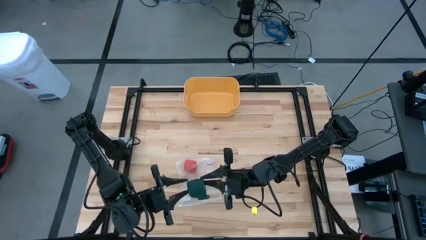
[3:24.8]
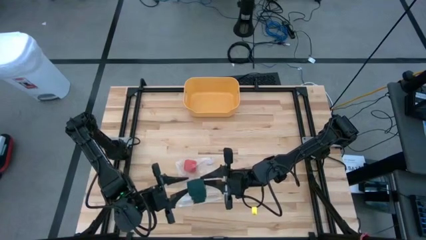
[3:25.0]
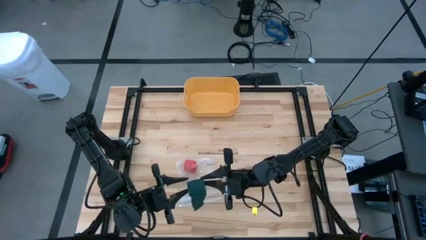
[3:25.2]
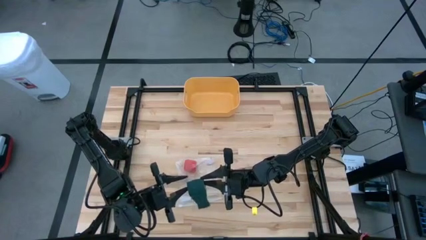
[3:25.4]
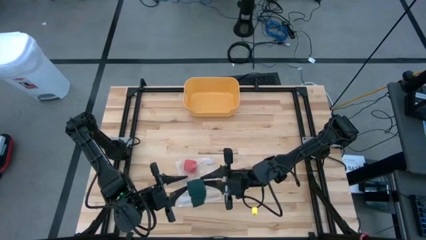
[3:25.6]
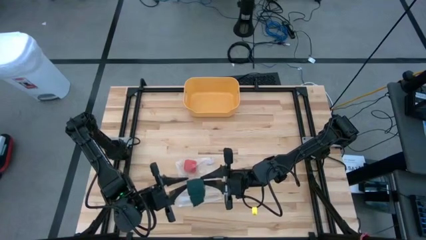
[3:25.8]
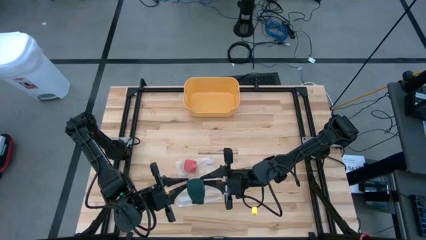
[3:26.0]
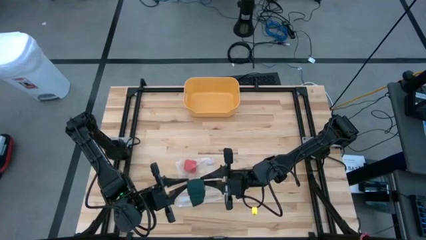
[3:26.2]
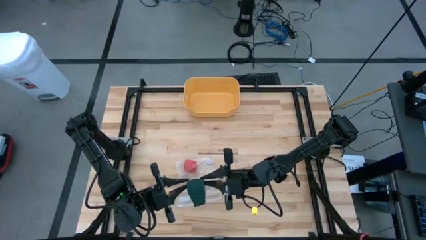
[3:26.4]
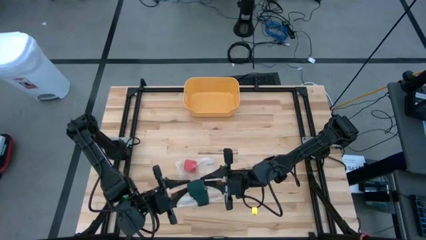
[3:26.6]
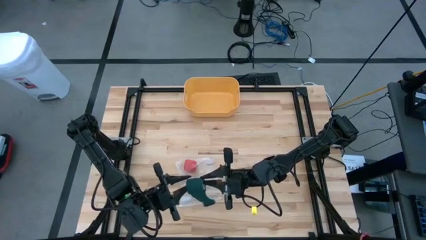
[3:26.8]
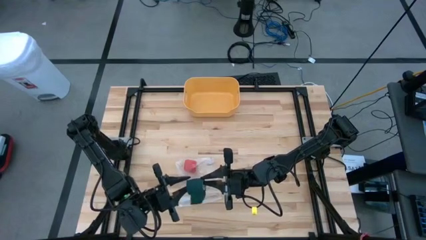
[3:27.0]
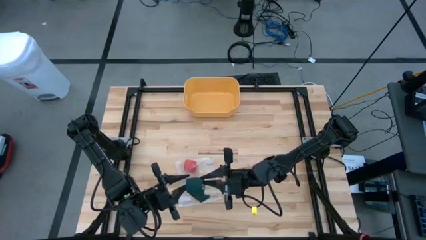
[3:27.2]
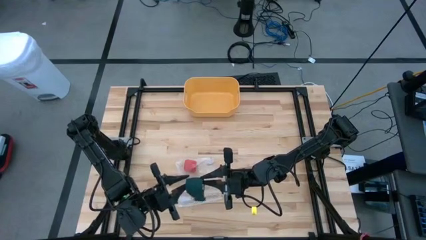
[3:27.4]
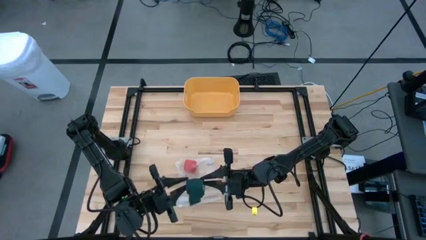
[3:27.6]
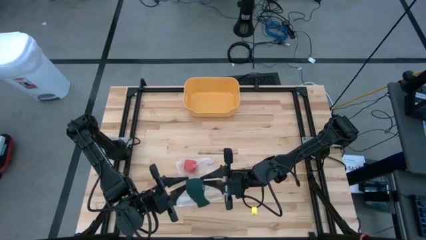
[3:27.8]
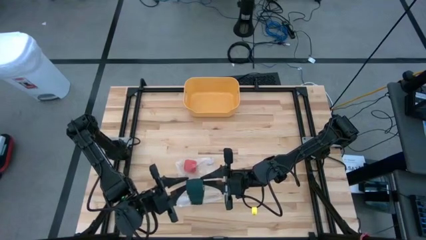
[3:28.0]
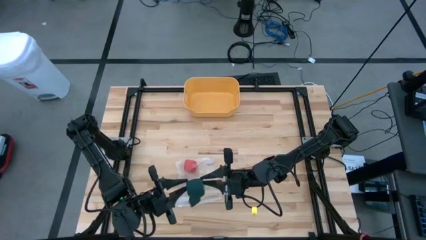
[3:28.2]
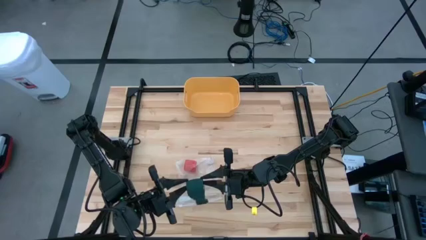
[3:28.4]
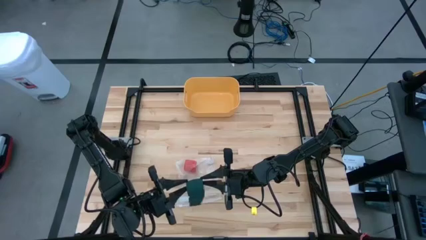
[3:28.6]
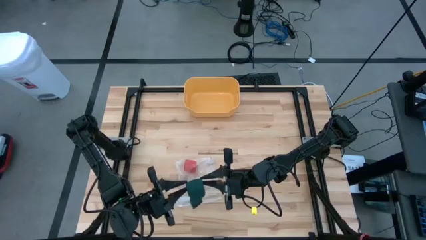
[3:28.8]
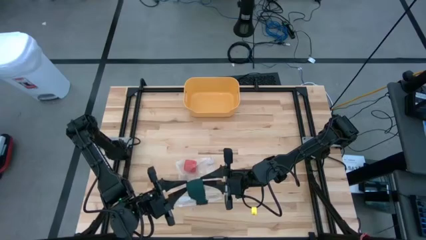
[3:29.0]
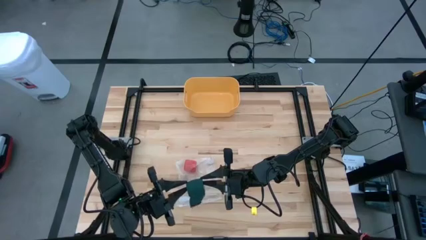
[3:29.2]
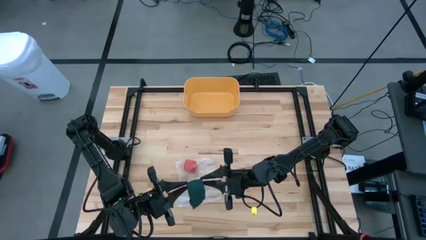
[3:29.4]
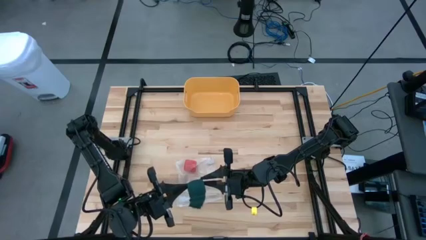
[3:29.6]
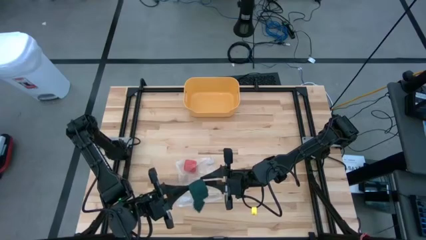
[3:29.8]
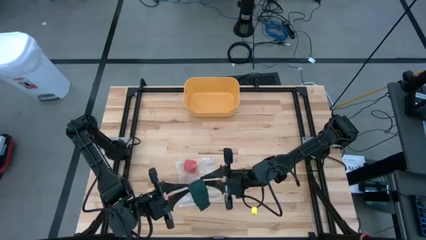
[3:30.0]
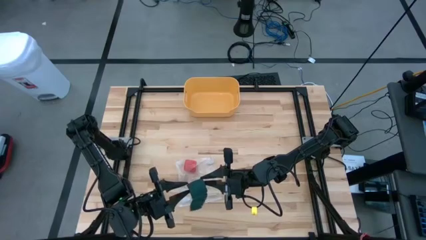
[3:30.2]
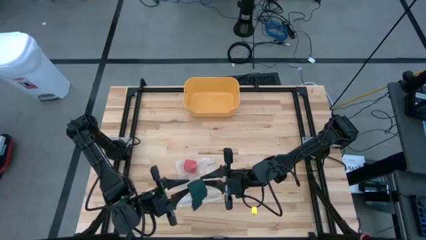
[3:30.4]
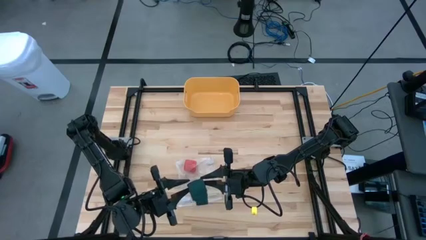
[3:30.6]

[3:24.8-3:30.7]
Task: Roll bandage
Roll the green bandage

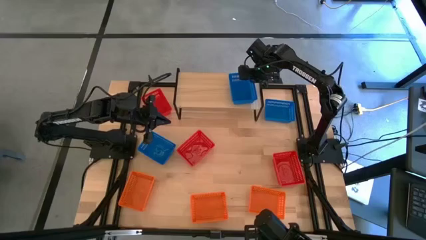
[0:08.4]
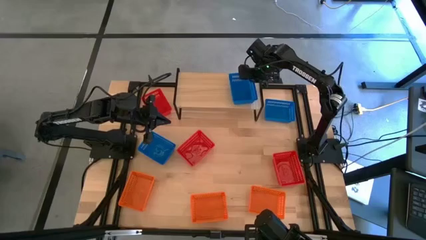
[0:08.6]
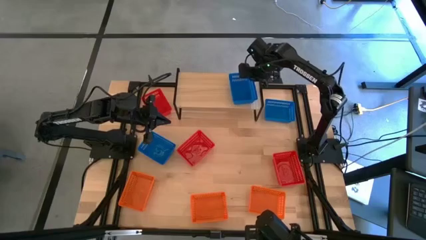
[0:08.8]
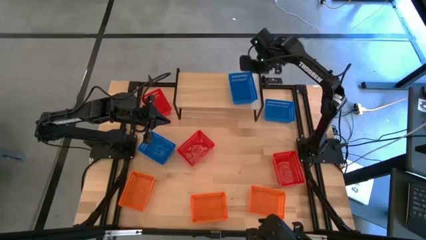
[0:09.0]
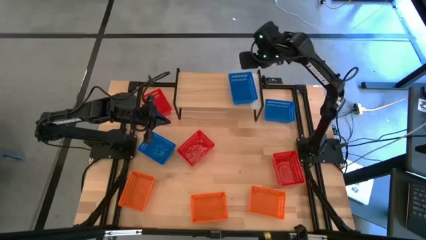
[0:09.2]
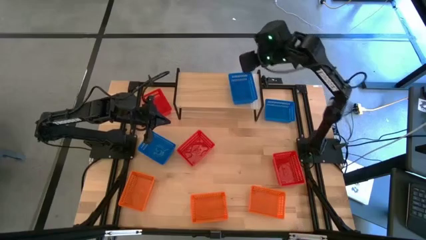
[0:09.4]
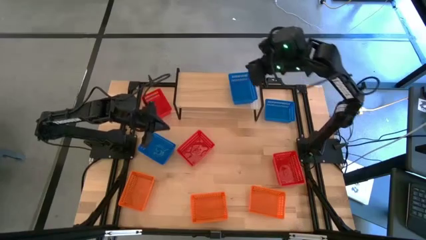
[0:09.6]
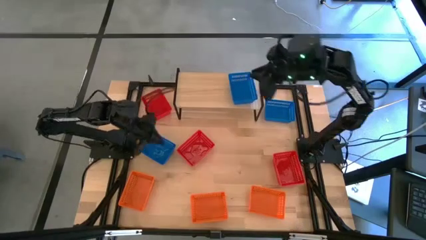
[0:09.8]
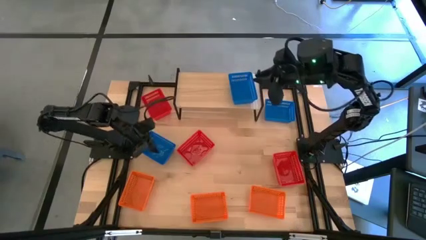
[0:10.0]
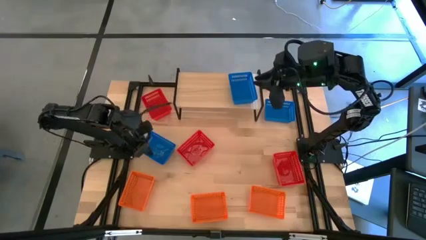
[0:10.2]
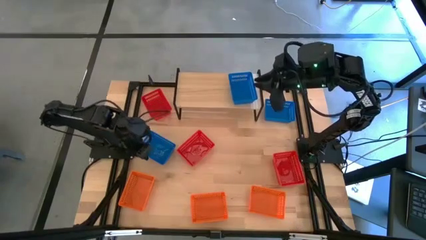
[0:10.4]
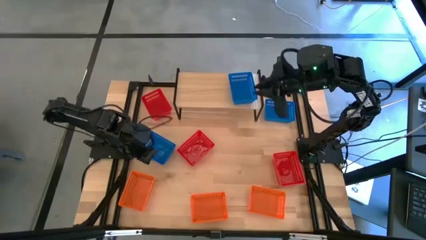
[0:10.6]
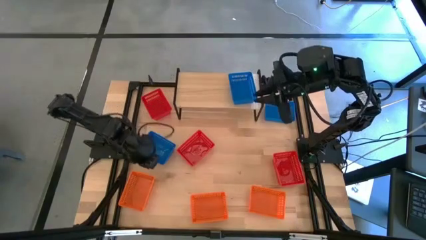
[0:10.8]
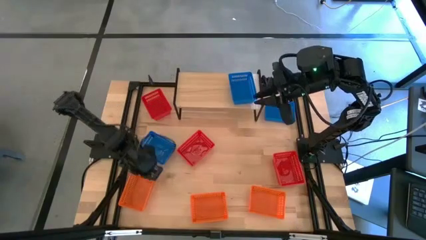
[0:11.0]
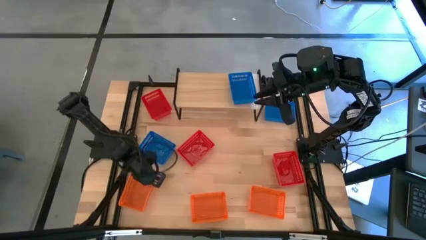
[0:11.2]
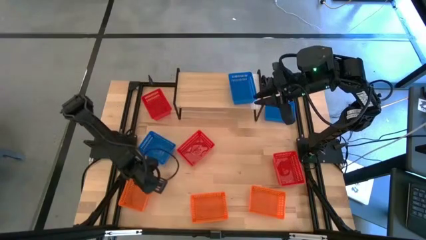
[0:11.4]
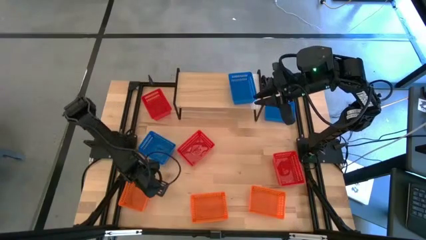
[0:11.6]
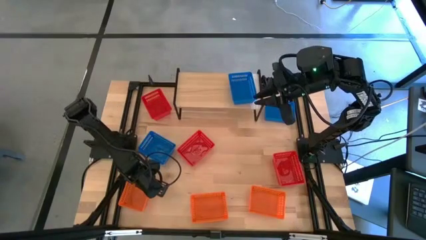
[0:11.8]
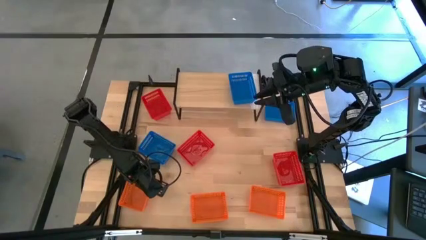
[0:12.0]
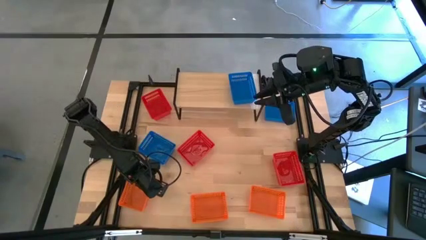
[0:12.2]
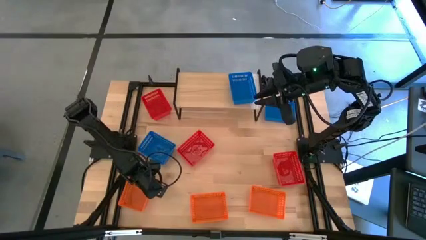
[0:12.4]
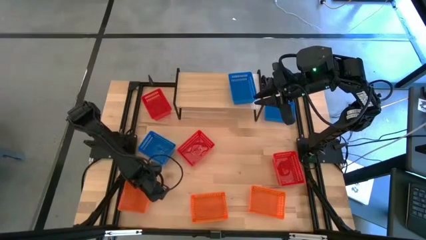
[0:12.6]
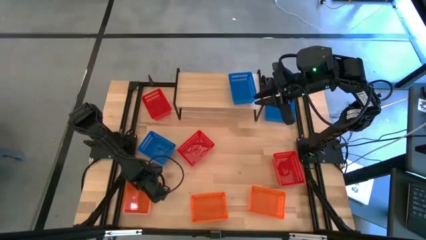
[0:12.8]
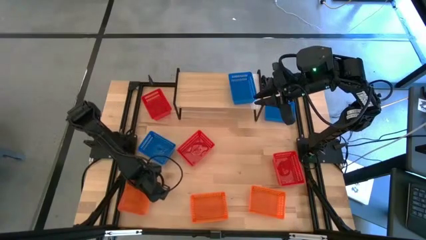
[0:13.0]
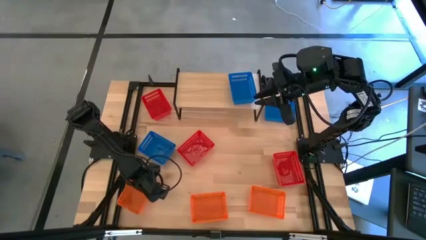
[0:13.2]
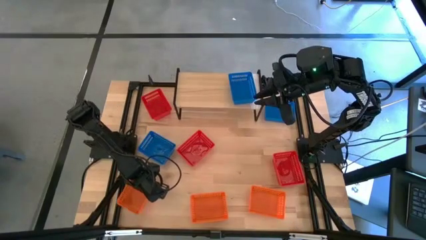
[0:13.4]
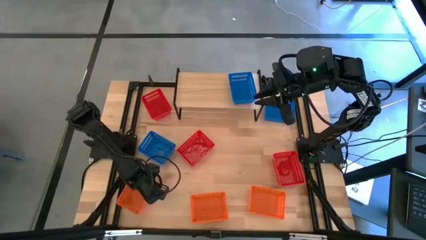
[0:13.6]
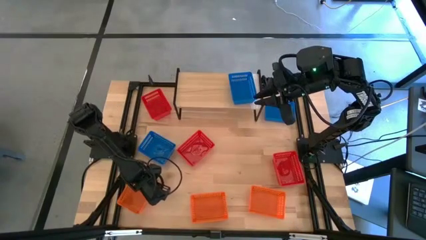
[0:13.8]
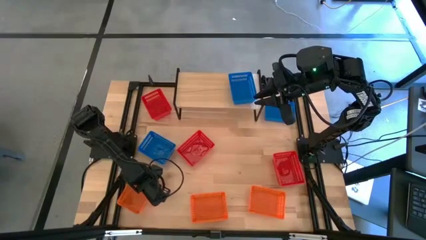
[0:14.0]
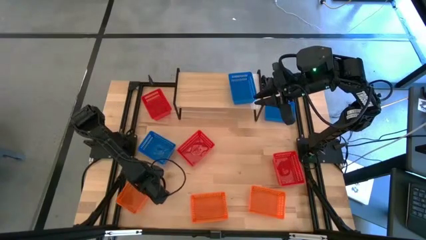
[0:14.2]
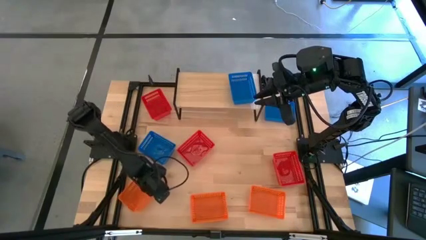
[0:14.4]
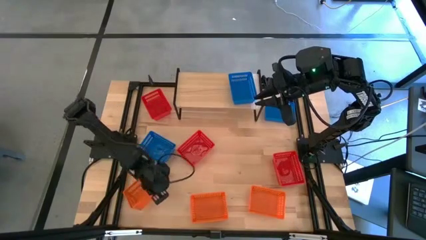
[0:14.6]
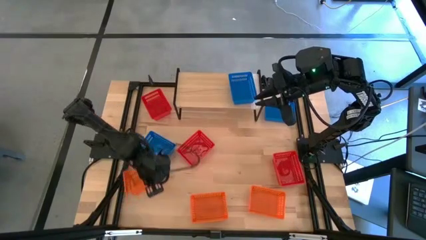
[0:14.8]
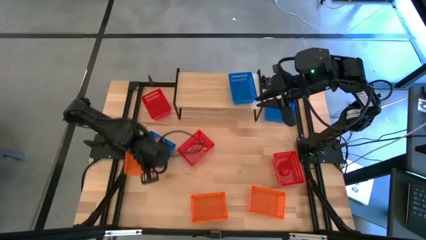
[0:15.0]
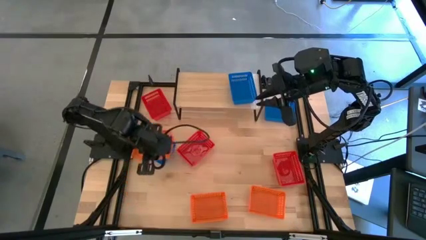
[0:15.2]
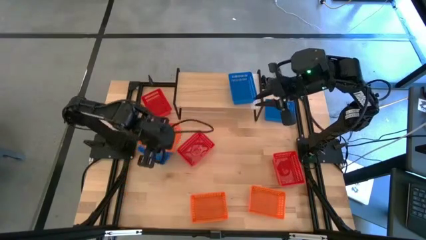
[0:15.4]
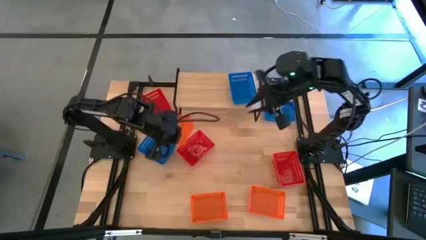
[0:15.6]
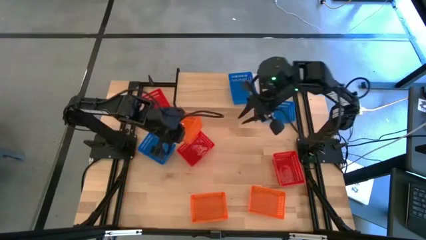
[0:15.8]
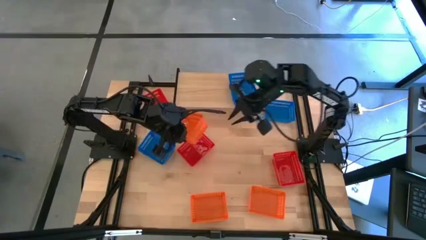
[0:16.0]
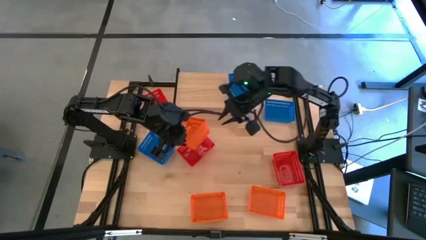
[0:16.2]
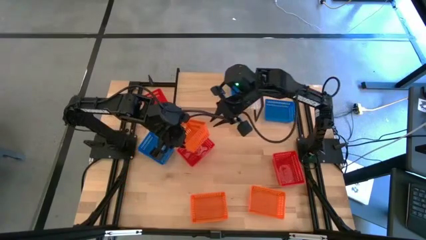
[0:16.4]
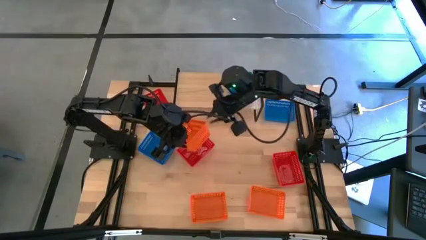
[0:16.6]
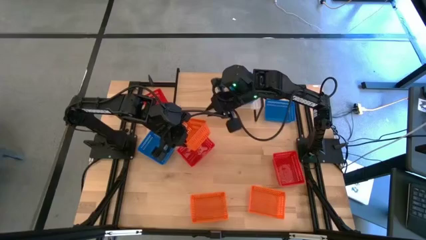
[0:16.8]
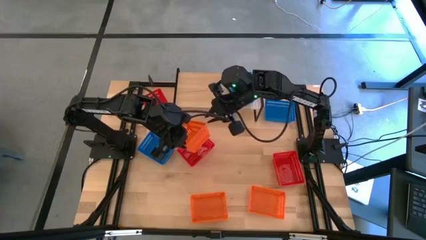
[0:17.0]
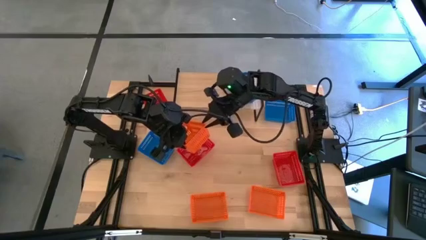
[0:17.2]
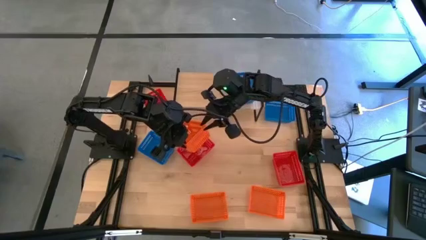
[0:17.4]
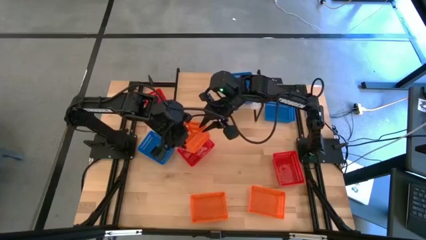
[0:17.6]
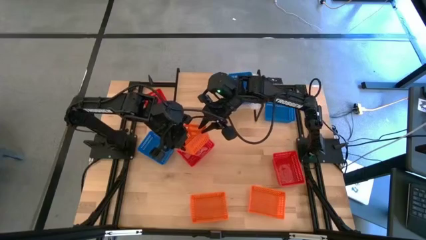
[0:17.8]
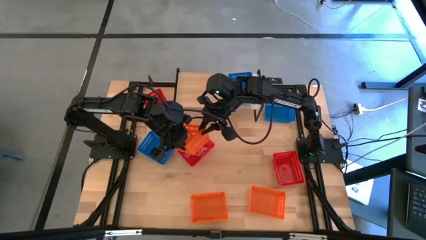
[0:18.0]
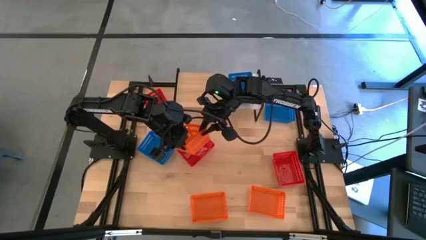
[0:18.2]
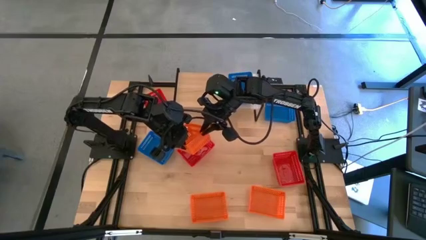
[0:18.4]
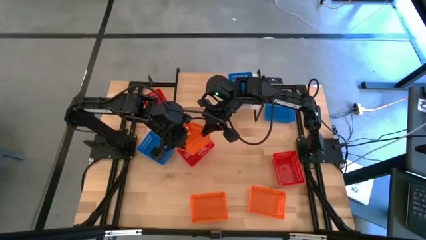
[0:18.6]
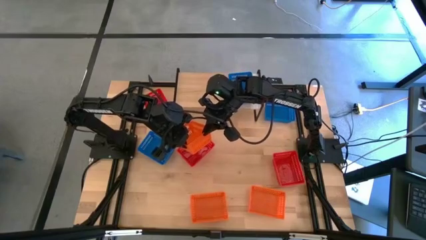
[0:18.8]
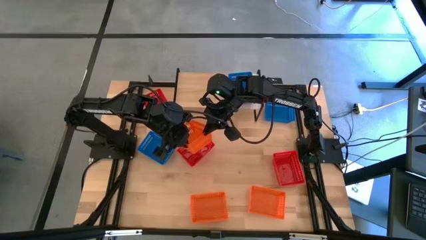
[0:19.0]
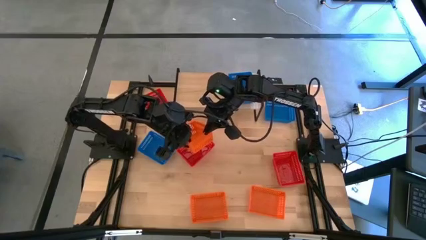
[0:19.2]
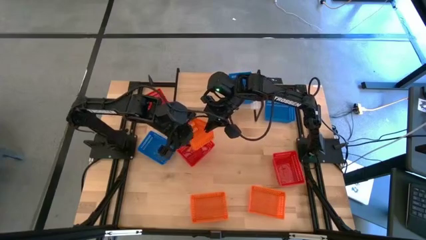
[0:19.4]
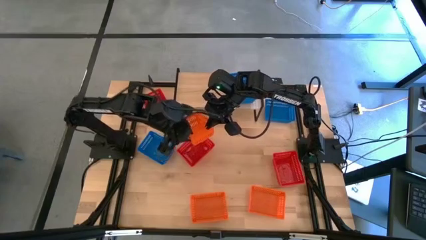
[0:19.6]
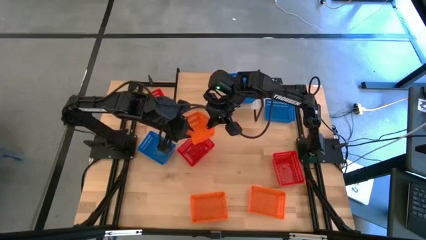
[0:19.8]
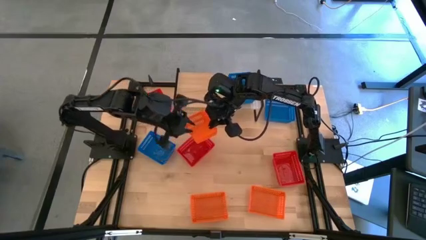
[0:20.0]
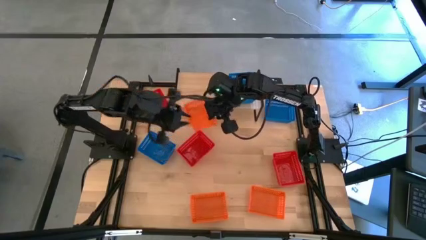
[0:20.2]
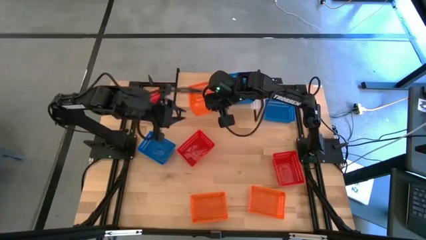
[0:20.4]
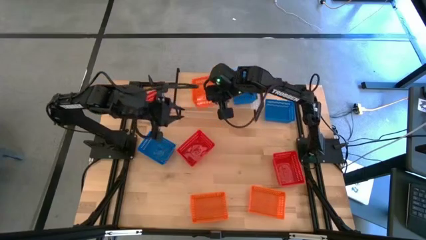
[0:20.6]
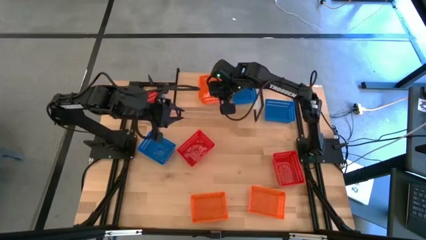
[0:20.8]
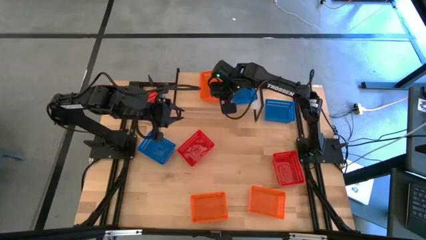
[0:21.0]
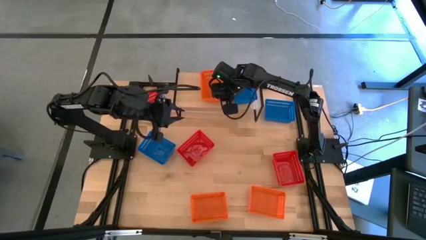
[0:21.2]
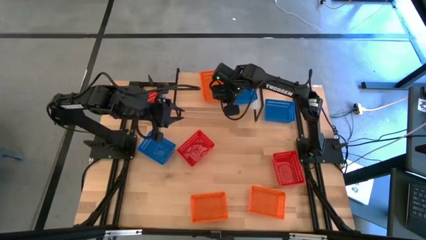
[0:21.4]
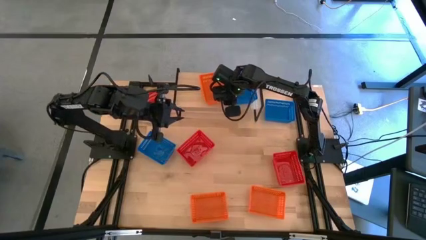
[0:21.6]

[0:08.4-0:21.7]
Task: Stack baskets on shelf by color
Put the left orange basket on the shelf
